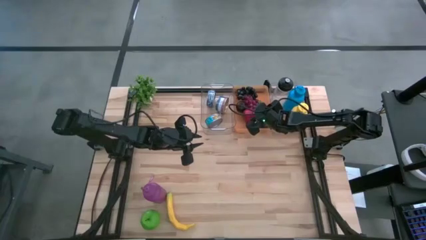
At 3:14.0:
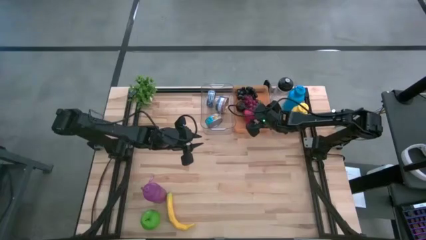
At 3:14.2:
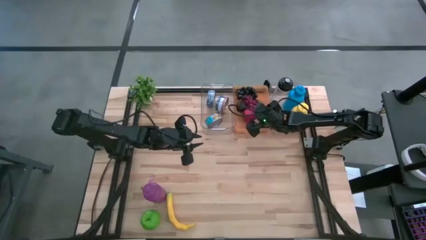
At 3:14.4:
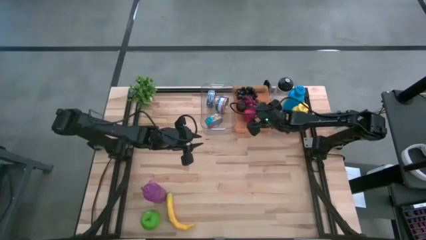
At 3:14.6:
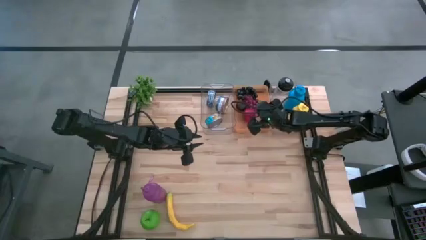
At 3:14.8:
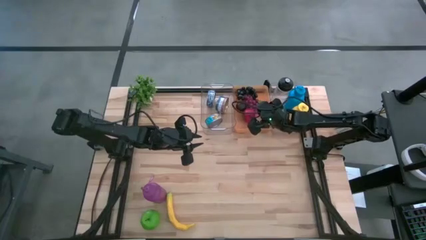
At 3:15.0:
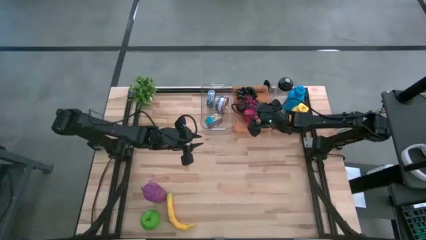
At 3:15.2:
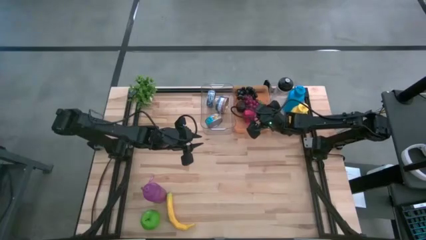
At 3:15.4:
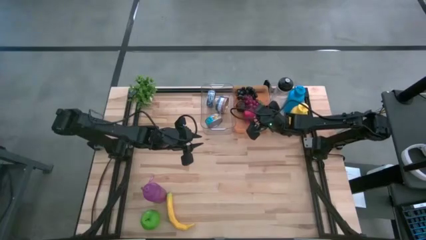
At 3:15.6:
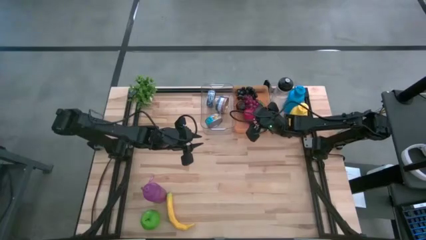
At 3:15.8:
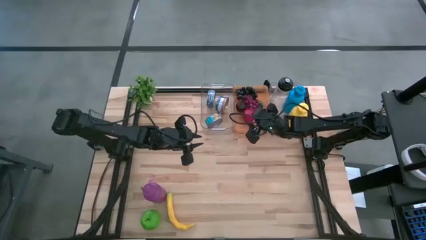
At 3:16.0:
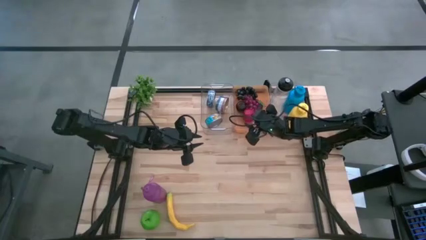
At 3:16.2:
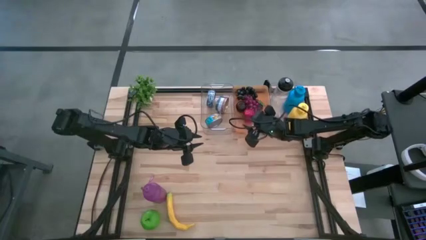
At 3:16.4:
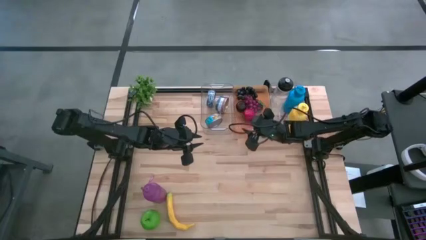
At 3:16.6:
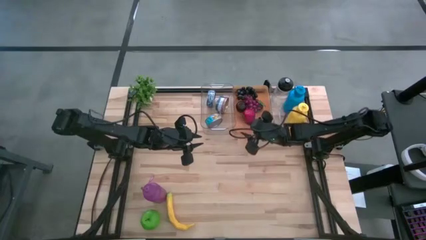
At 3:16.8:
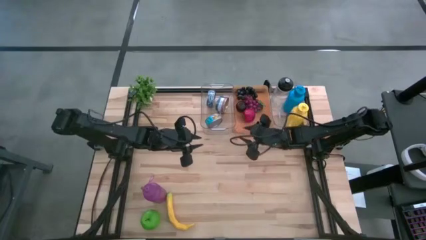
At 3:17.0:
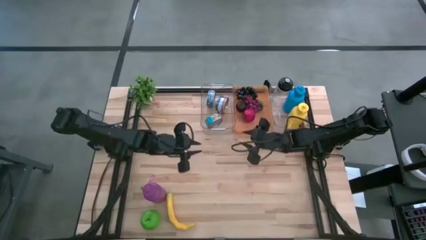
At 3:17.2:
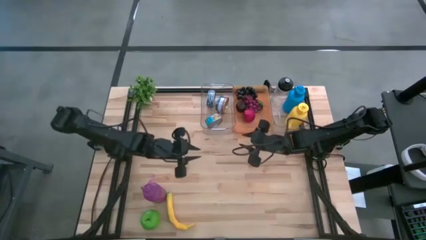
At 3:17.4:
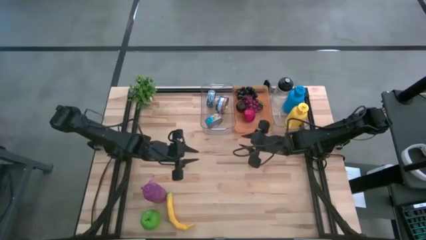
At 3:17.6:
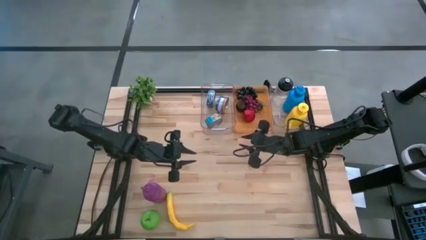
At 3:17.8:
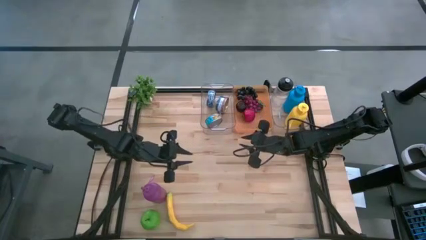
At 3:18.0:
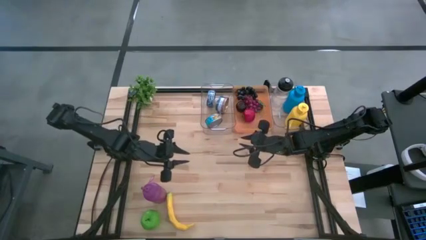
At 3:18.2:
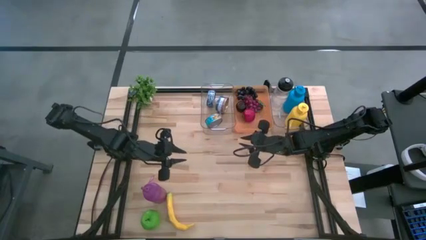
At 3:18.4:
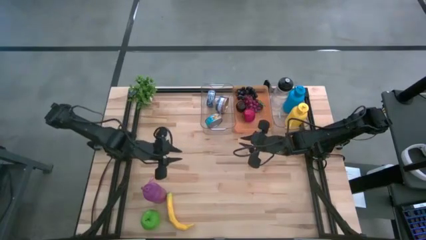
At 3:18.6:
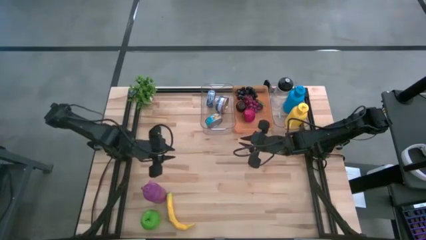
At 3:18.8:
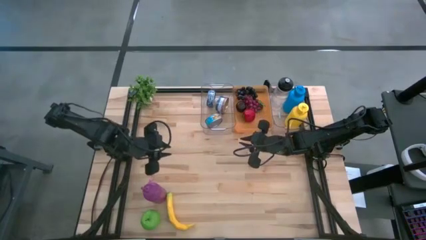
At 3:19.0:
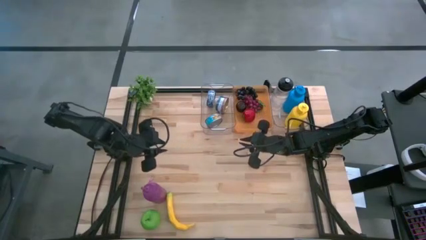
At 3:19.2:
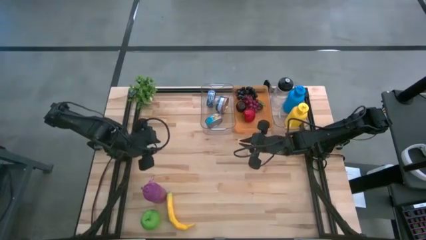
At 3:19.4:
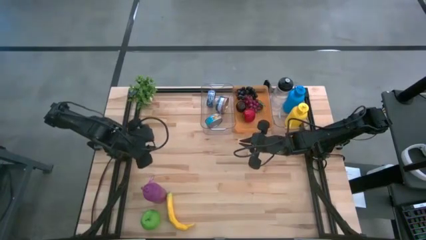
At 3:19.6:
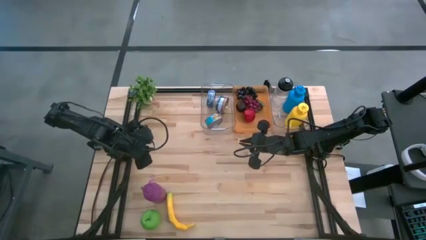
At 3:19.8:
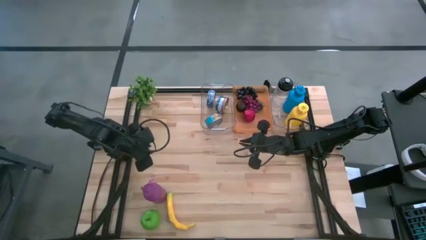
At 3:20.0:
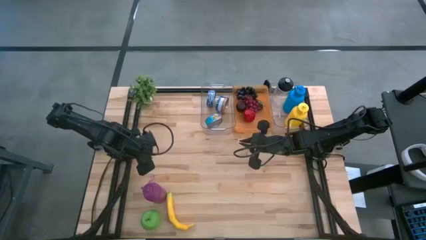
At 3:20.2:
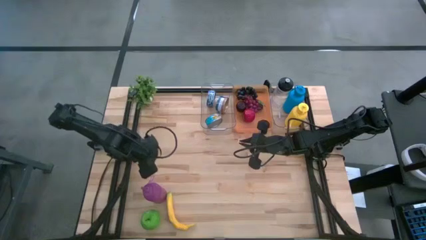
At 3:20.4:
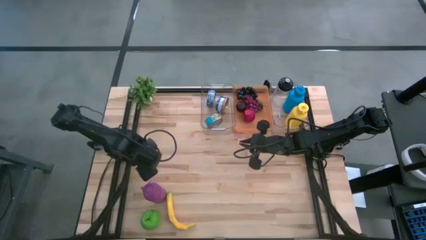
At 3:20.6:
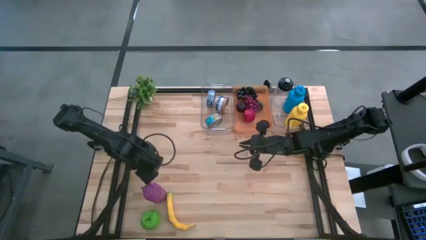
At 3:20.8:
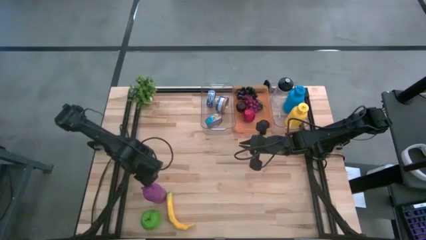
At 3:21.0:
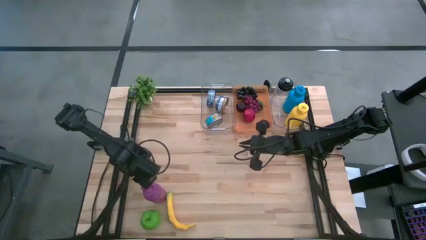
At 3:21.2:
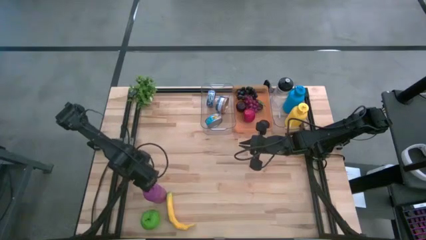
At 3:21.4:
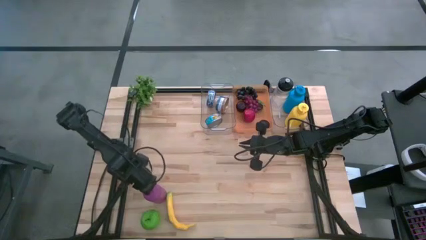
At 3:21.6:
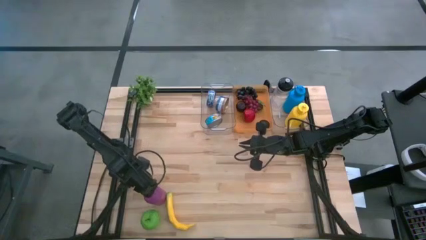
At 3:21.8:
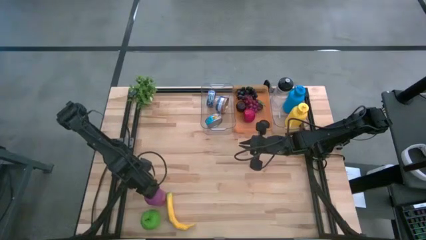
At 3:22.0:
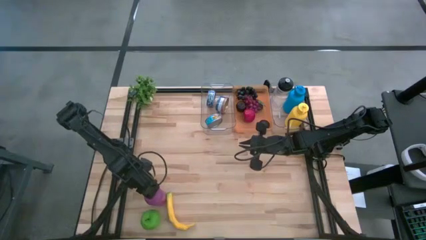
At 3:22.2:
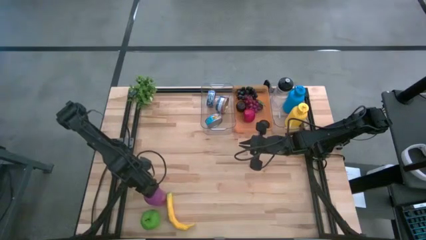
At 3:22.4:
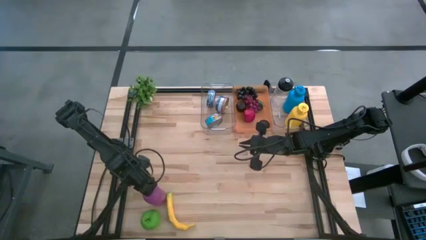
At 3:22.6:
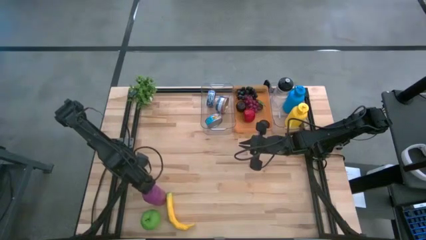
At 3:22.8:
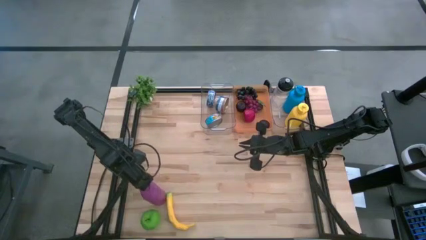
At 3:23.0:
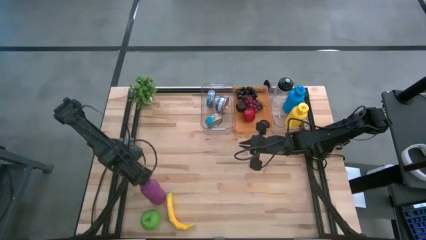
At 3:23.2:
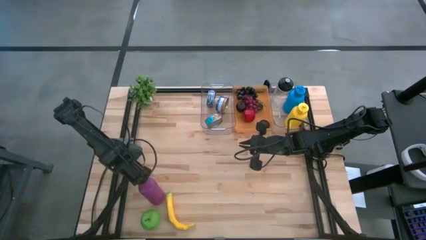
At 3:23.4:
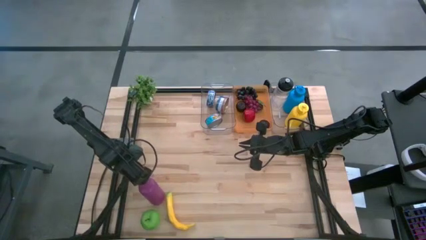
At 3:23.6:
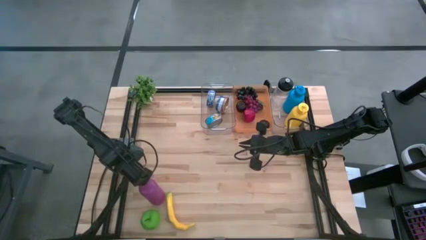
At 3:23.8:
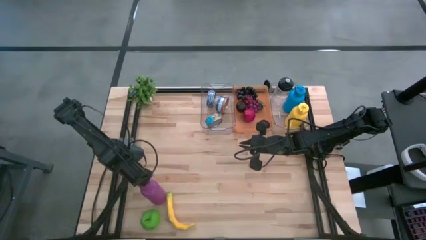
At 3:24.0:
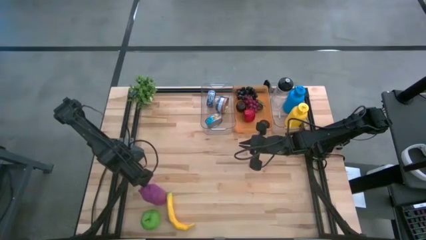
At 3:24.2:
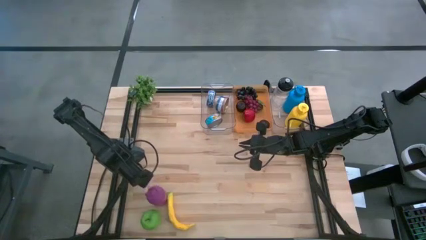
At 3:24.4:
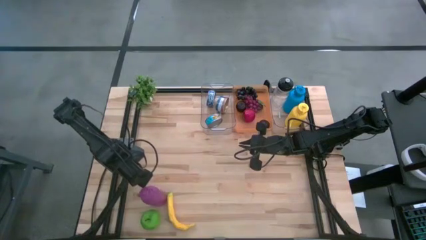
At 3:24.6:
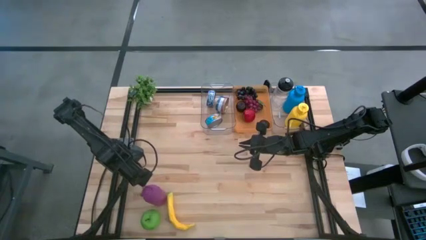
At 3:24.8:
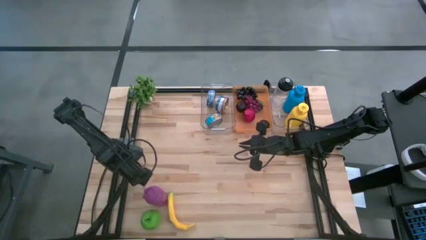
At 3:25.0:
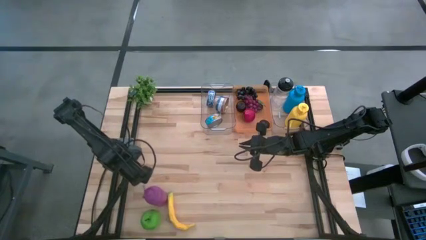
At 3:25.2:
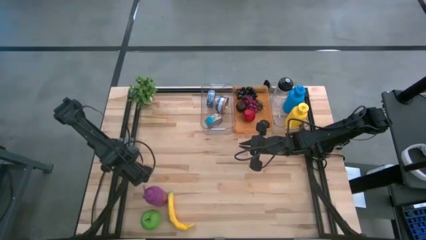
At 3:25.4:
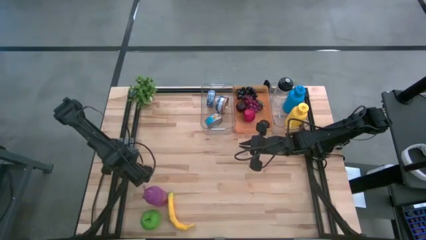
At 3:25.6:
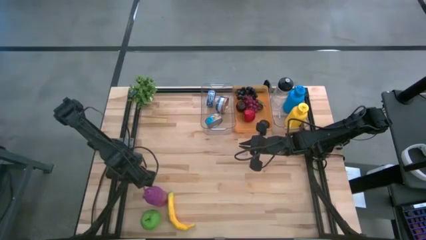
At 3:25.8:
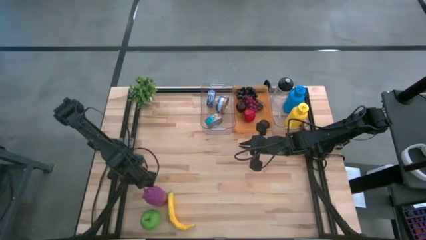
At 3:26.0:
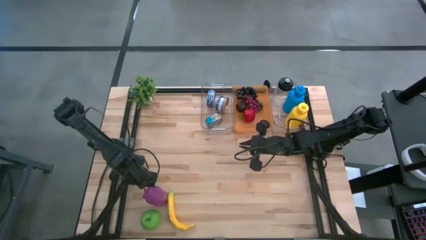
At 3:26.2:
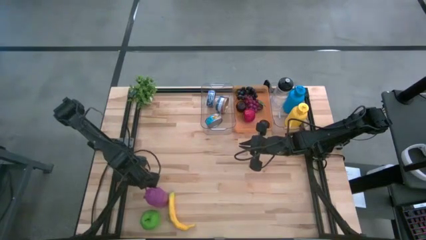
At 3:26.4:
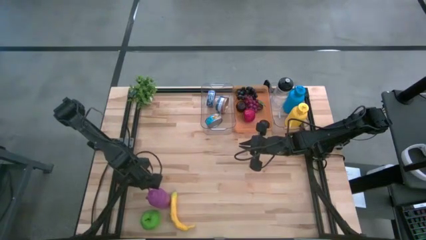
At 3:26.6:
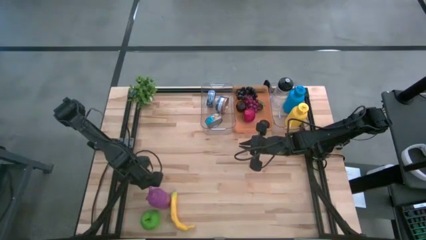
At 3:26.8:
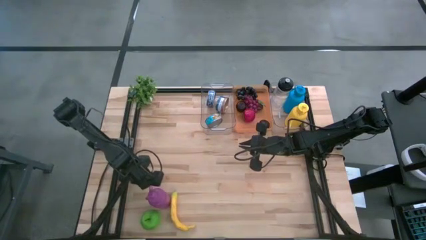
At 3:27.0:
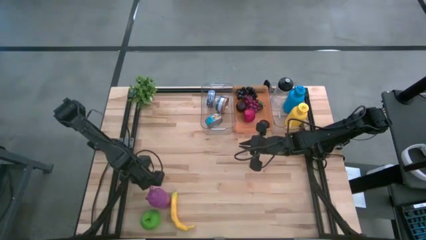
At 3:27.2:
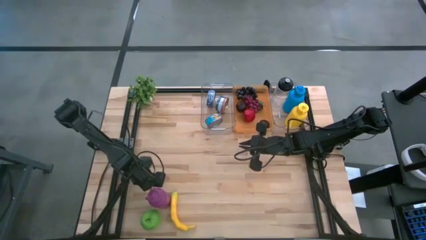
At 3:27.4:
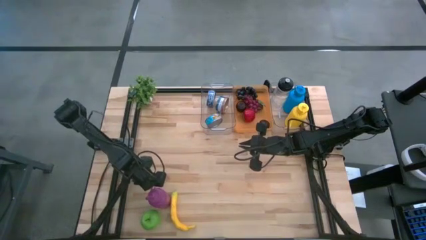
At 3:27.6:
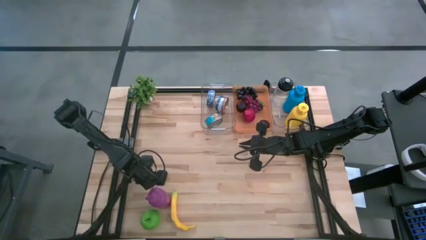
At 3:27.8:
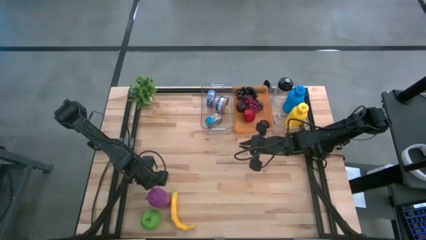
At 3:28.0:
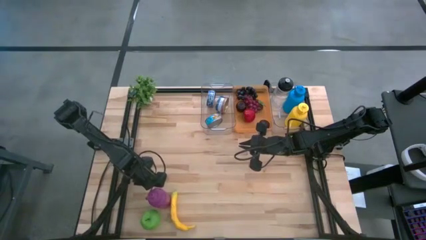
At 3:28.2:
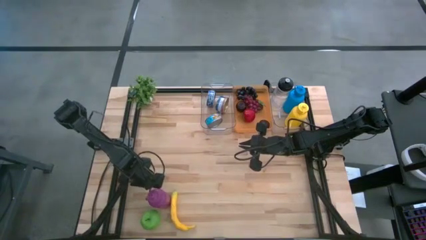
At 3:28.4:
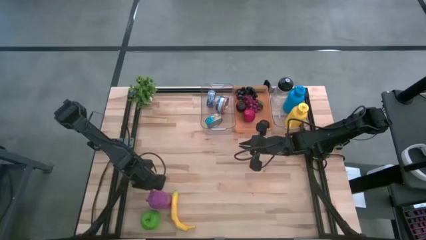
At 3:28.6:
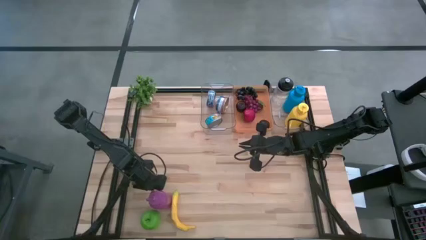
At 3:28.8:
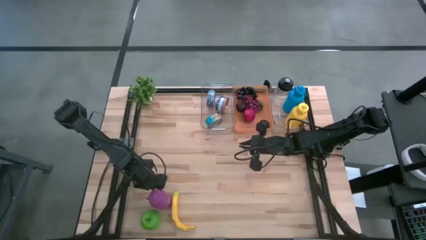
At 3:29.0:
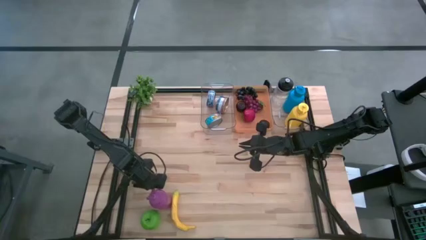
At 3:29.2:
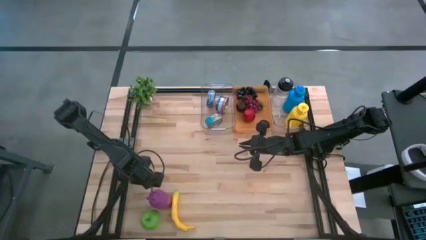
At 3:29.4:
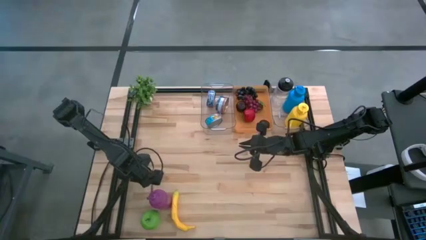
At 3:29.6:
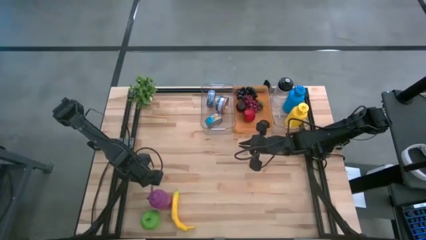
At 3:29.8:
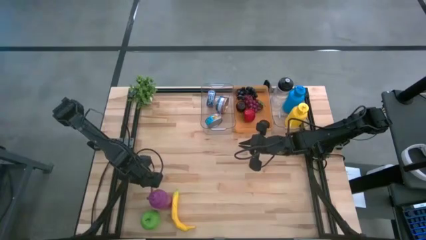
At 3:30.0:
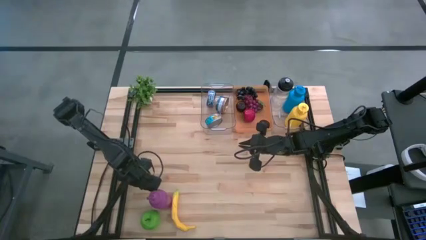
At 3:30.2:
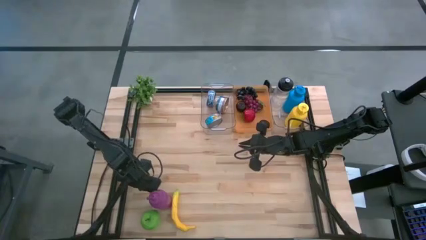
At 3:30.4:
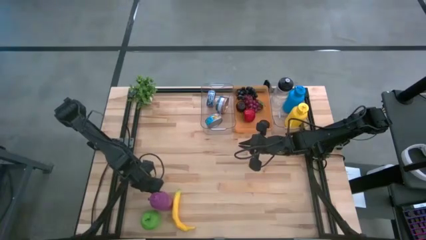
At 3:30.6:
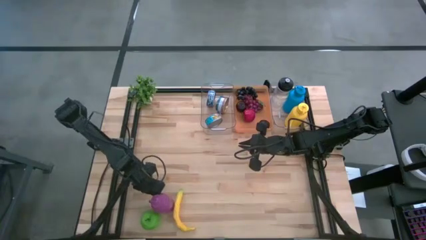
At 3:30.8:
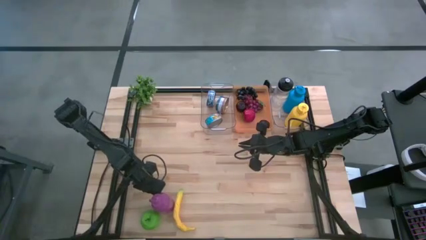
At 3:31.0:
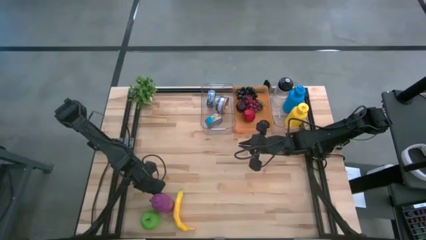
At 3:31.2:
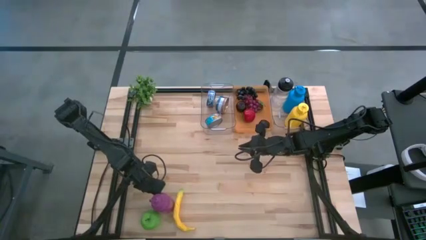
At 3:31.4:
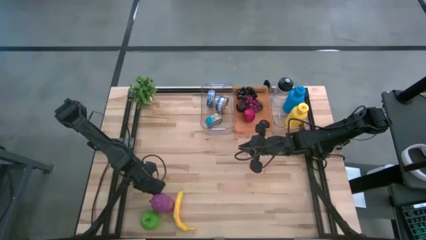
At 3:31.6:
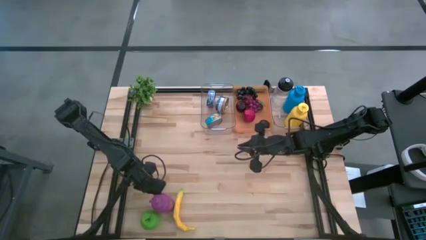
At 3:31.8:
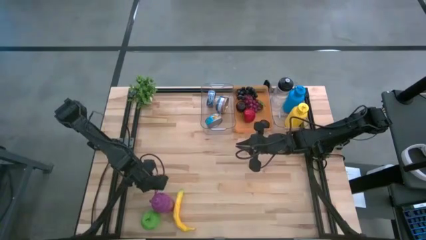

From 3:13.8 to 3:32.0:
Task: Pick & Place Food Item
Put the violet tumbler into the right transparent bin
